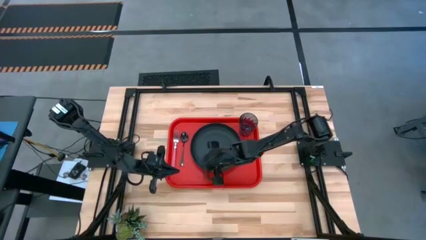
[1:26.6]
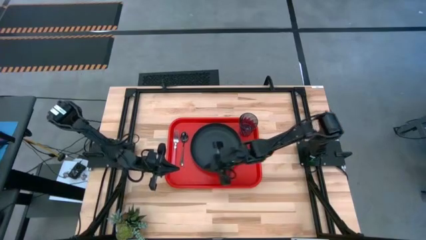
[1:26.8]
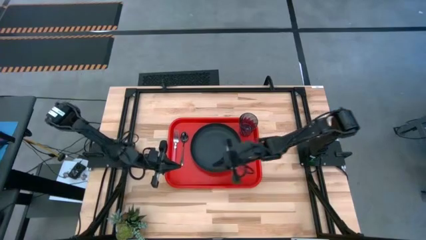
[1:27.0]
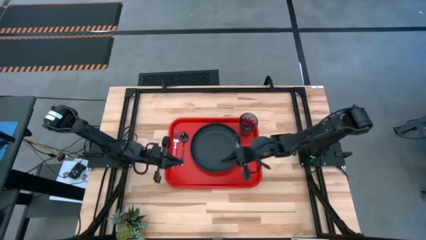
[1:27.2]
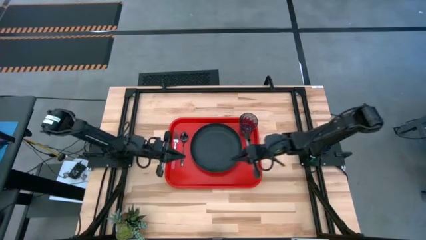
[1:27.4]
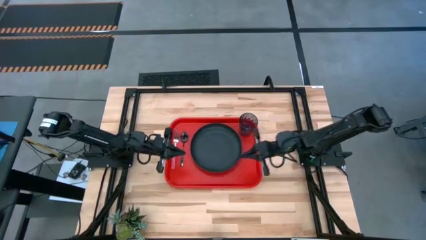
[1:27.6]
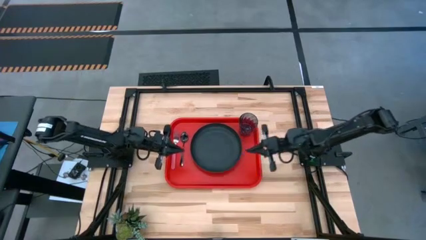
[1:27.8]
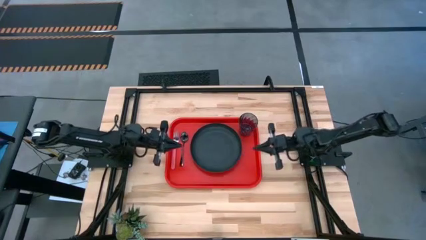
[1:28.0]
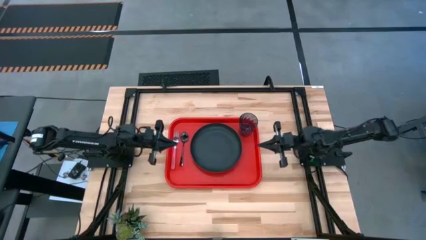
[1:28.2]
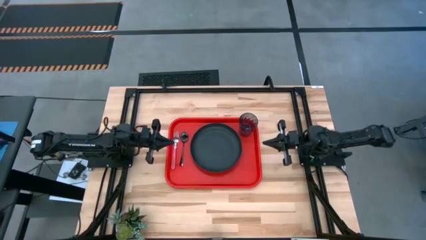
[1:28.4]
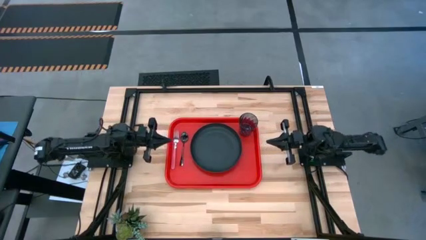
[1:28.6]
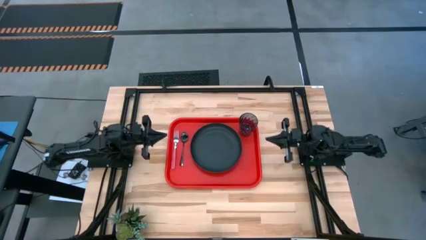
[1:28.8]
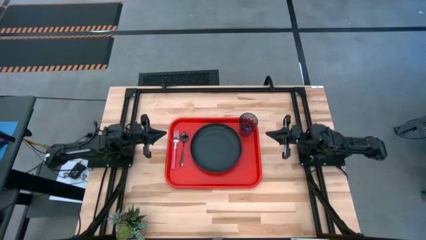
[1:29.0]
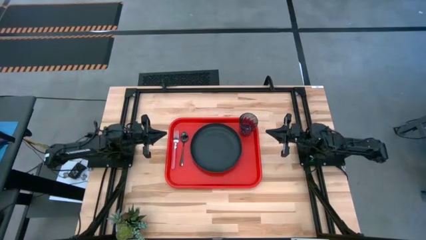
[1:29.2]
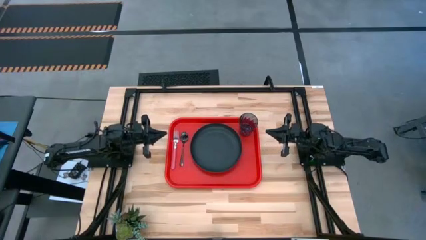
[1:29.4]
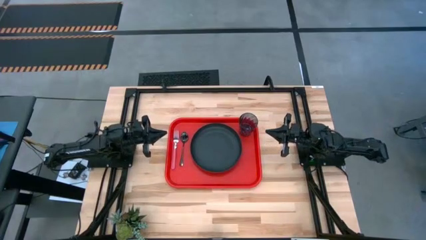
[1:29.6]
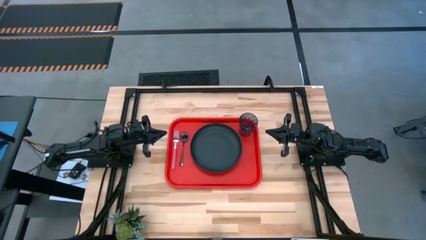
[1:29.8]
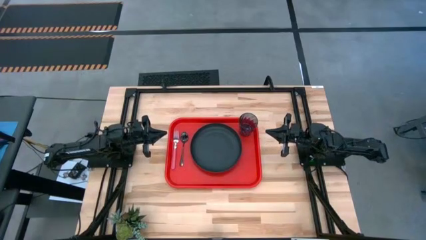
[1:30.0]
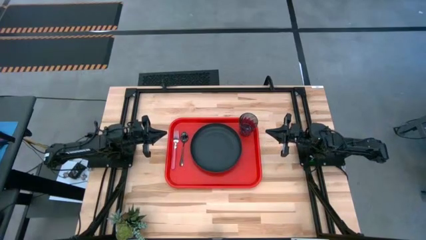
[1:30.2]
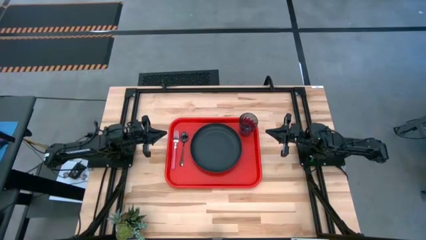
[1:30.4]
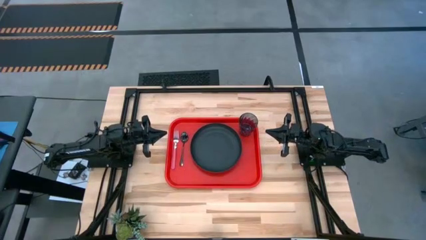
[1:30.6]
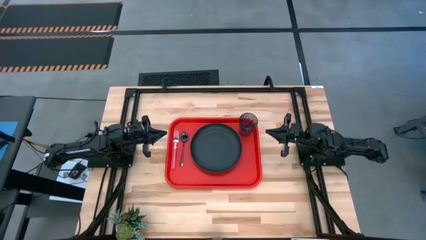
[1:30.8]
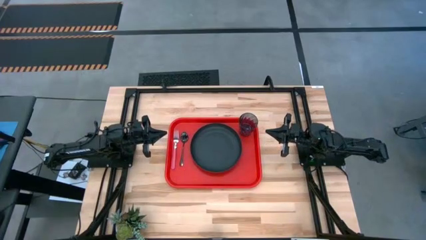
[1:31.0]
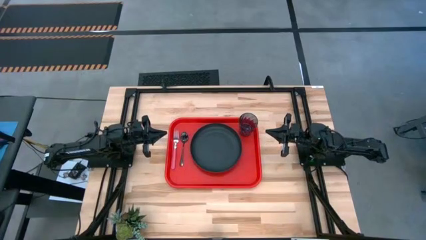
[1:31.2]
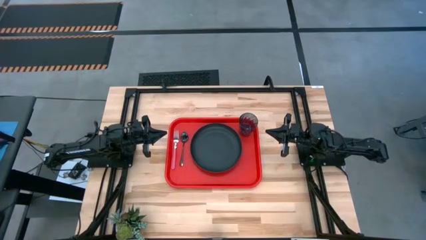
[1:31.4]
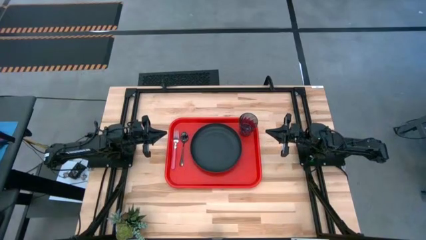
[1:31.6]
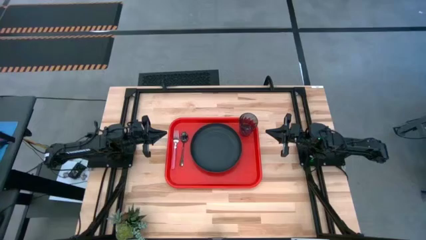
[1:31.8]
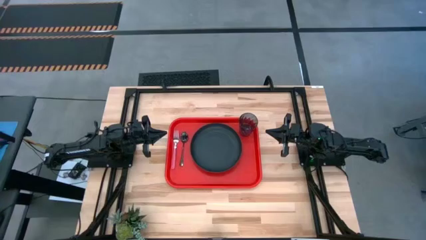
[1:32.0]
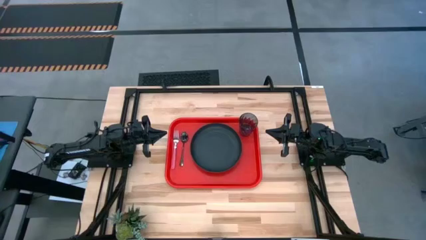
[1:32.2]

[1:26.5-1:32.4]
Task: Pick and place plate/cup/fork/spoon on tray
Return to Home Position

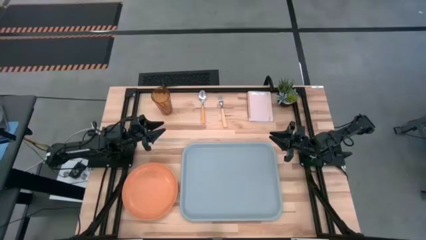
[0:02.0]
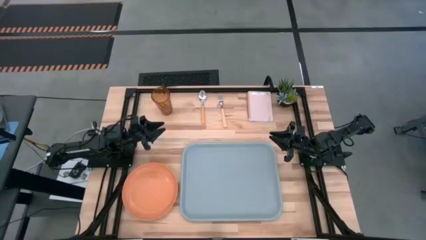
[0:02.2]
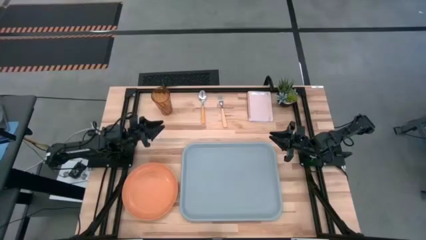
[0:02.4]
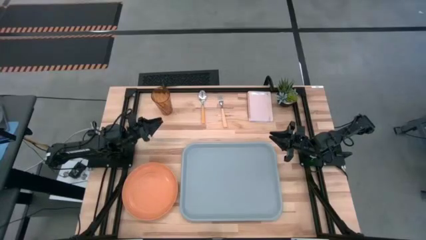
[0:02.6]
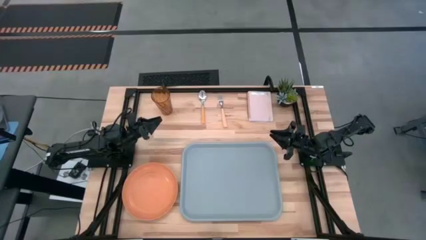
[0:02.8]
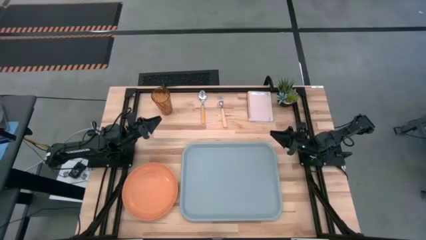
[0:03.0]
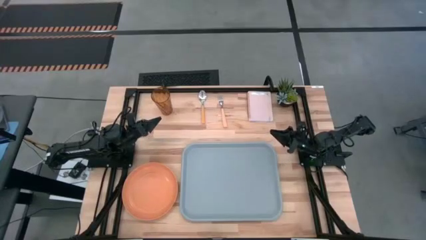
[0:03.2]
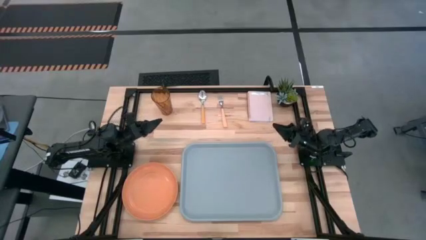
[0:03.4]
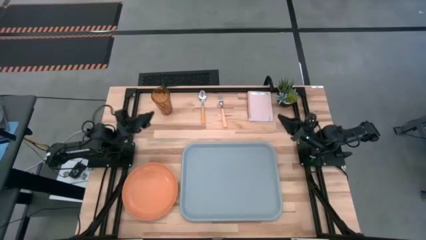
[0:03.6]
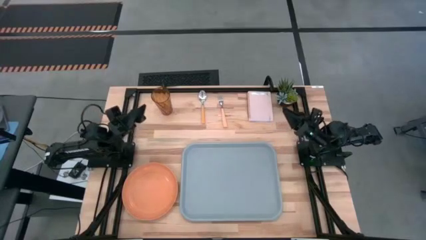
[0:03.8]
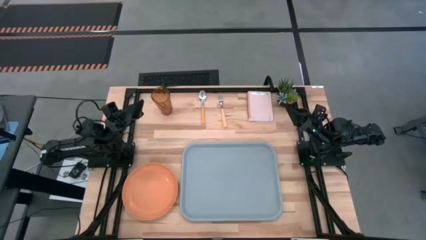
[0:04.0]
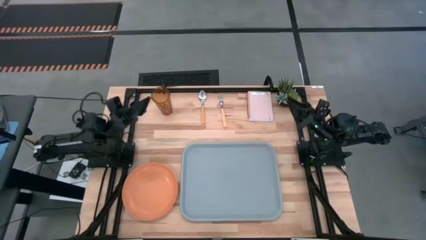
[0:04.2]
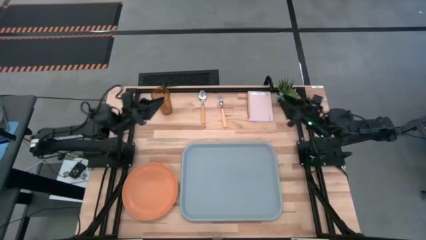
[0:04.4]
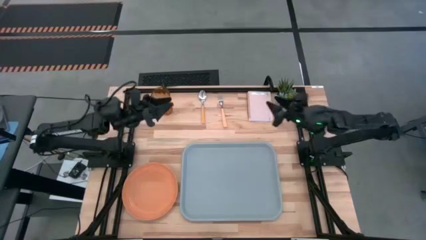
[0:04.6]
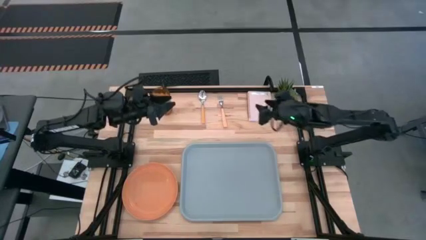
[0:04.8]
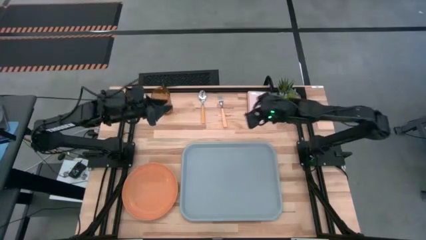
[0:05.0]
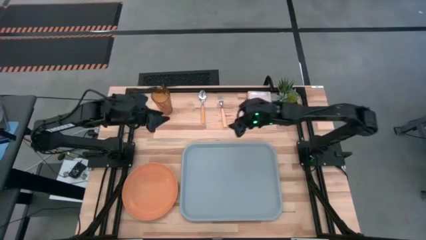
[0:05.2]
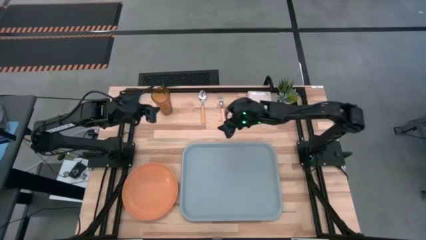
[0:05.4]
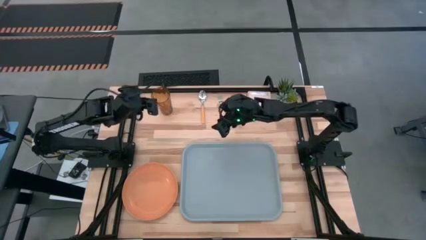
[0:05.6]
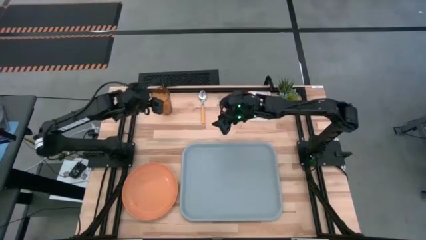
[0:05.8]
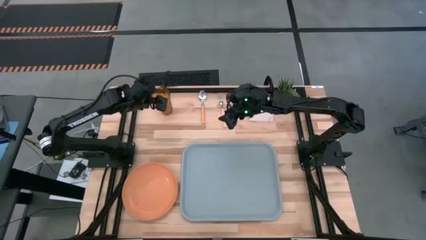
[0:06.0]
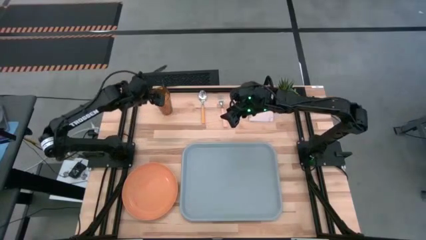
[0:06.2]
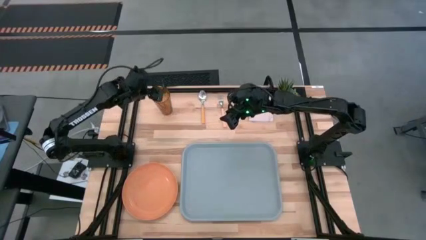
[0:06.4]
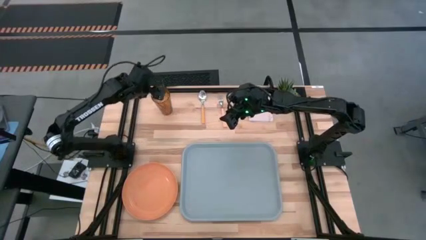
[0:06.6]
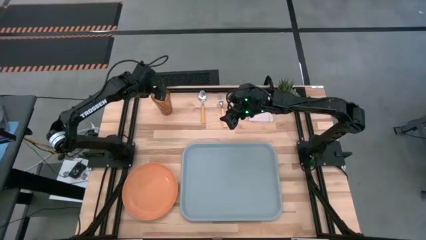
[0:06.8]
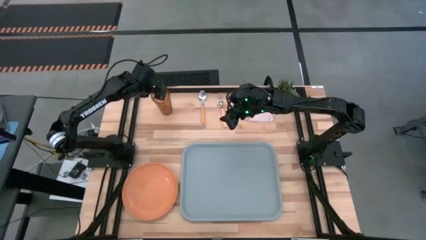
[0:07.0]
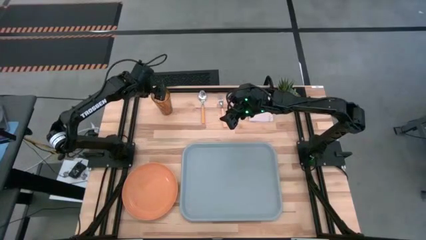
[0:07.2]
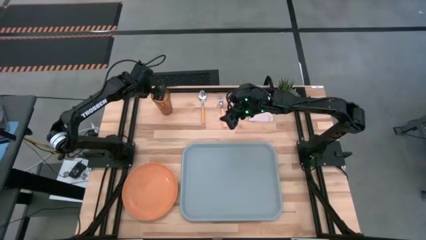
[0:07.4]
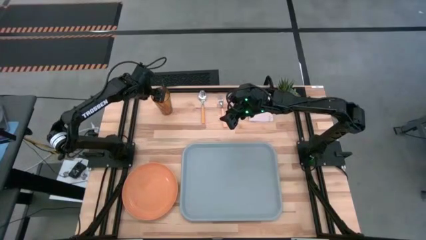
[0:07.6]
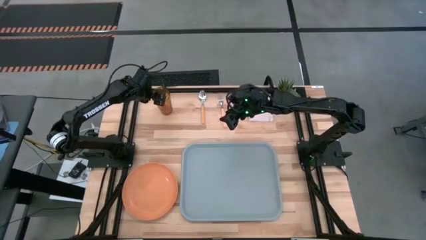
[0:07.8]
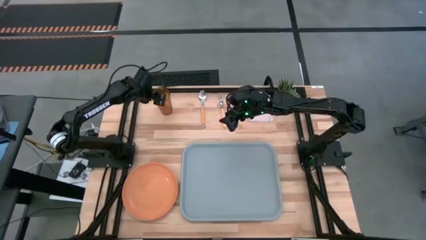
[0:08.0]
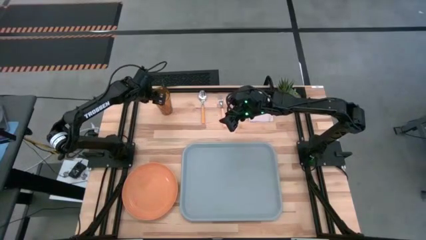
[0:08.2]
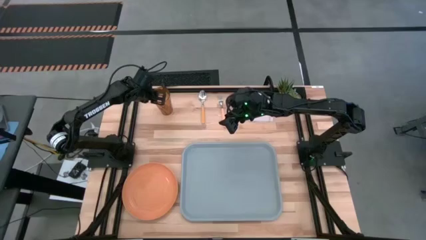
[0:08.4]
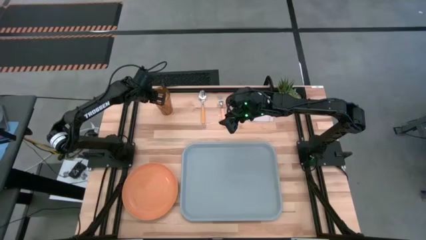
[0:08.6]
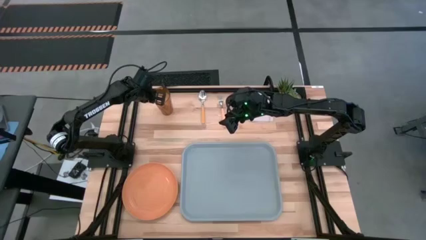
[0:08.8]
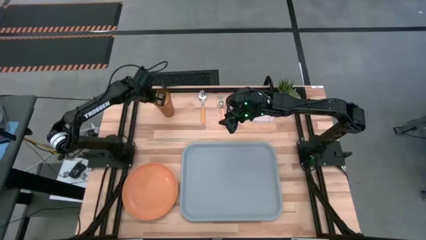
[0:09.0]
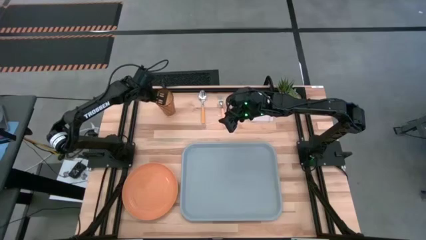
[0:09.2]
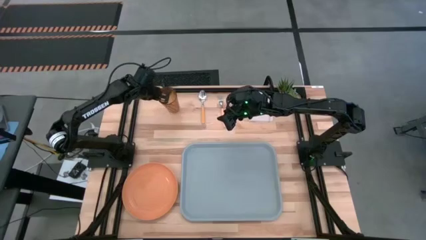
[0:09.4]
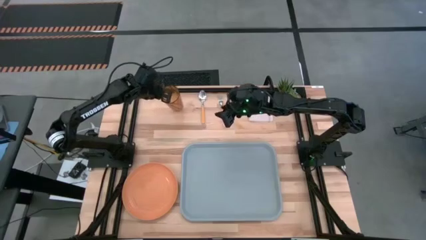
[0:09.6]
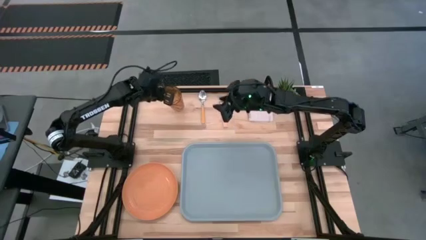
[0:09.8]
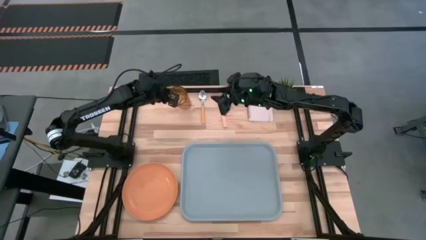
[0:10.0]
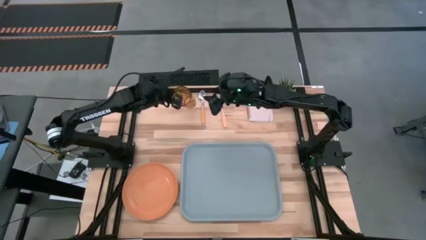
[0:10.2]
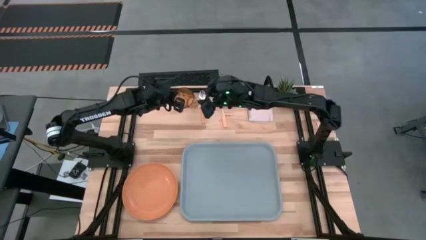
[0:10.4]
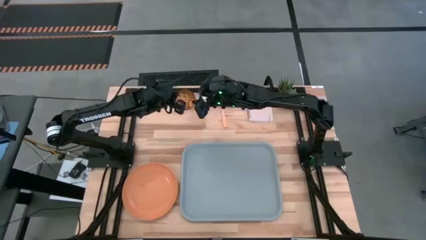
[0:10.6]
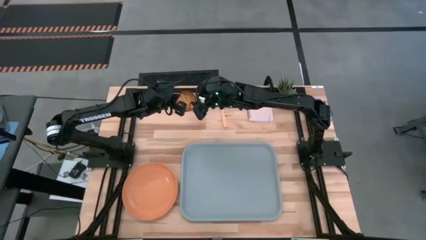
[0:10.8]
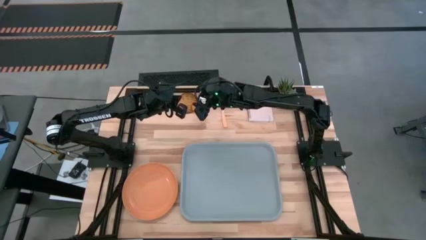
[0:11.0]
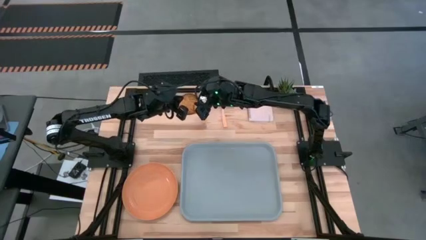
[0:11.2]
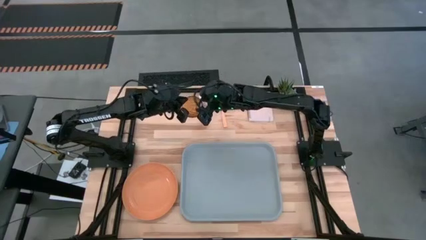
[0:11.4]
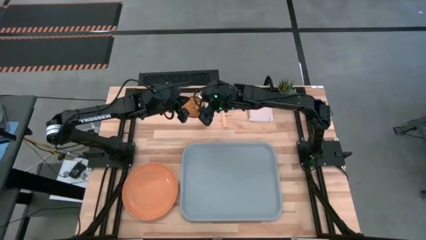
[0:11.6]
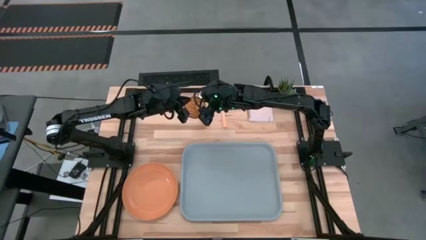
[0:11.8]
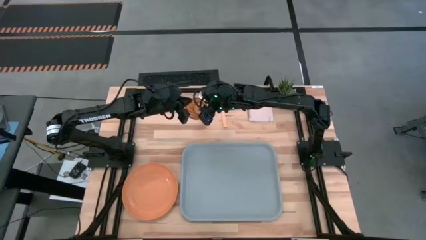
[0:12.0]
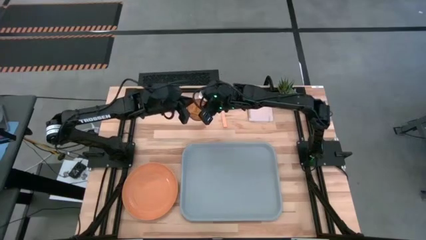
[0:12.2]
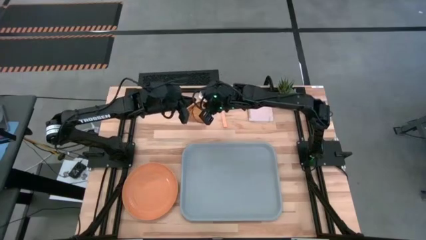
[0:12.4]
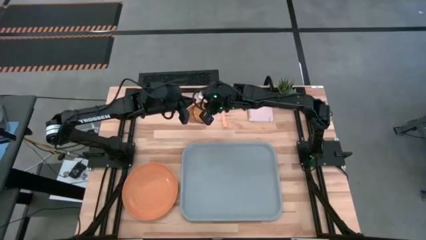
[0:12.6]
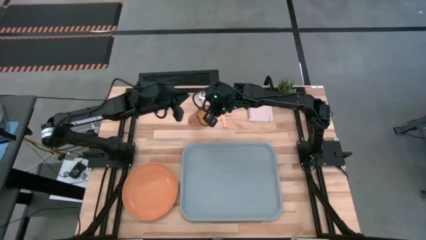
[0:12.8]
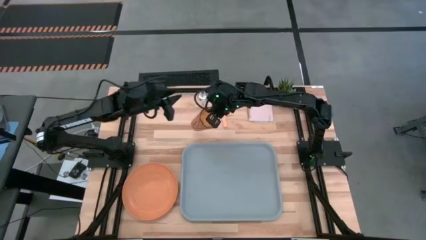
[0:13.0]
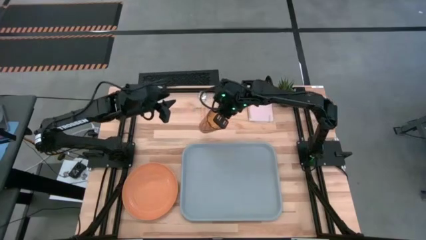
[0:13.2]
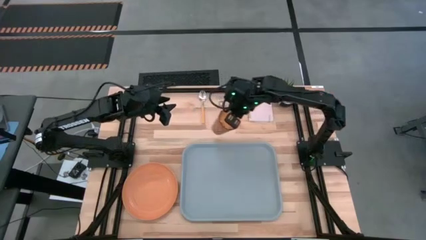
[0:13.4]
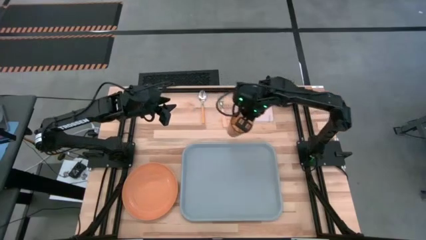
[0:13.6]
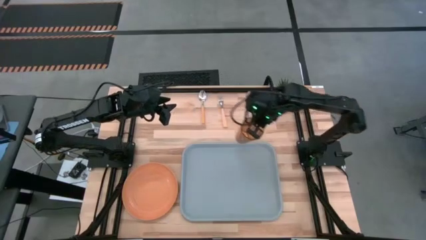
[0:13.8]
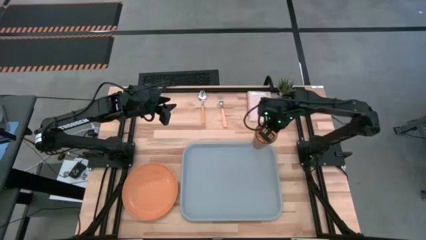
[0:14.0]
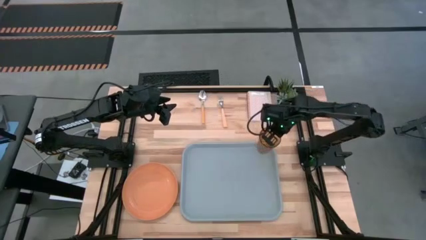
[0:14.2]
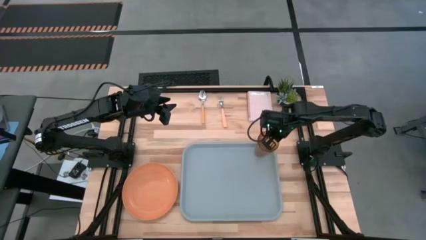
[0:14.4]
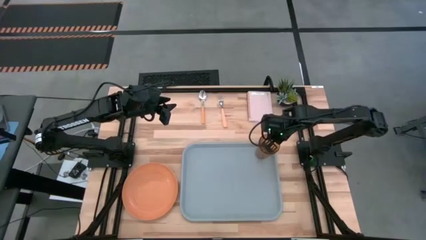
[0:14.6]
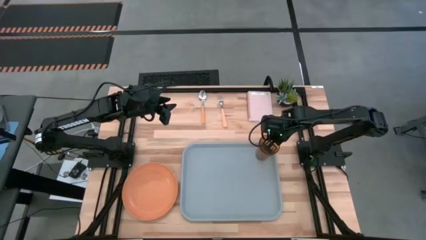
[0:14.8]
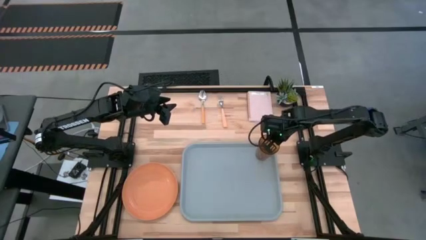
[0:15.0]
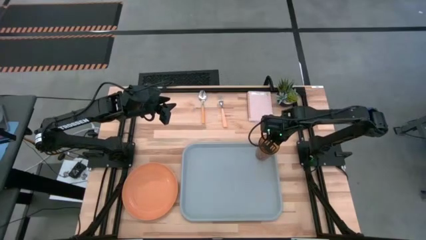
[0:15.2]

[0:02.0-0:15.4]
Task: Pick and place plate/cup/fork/spoon on tray
Put the orange glass on top of the gray serving tray
